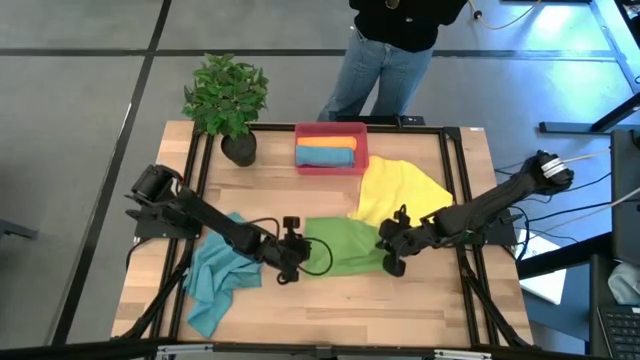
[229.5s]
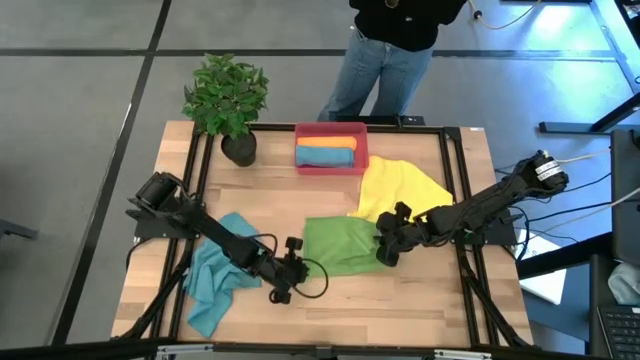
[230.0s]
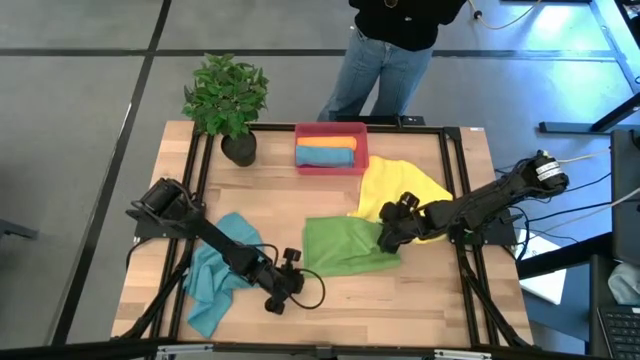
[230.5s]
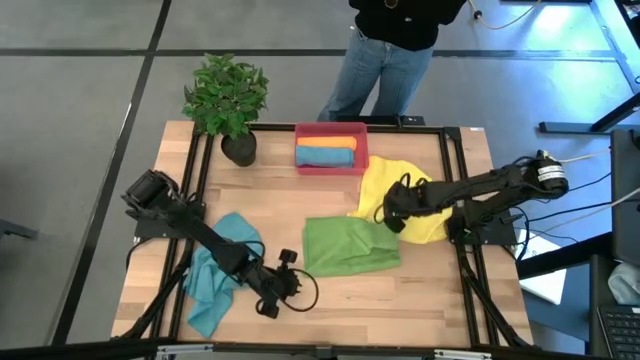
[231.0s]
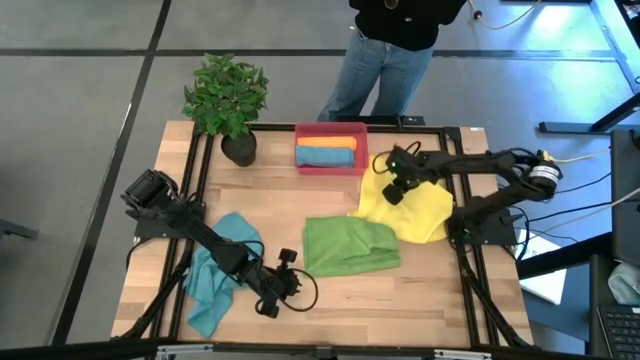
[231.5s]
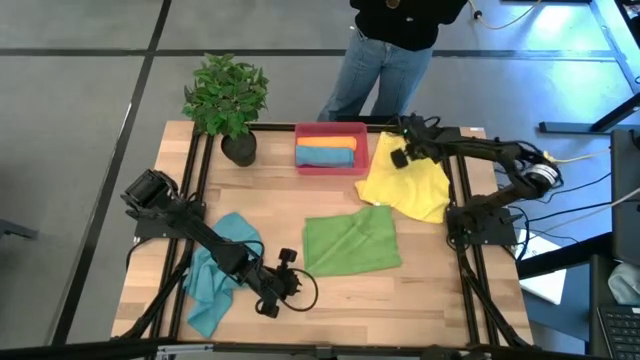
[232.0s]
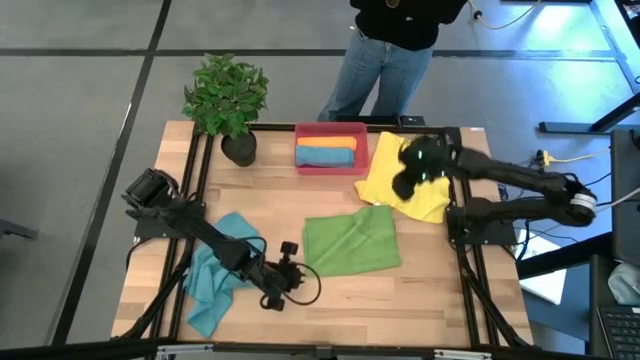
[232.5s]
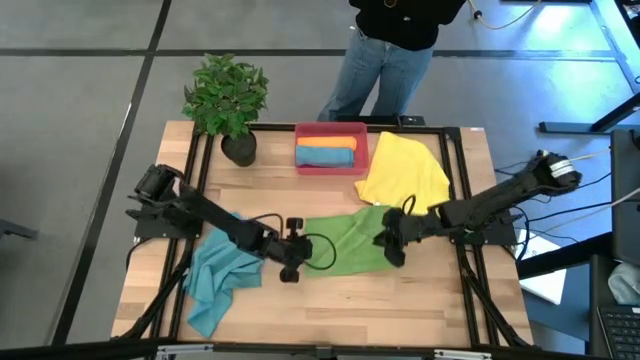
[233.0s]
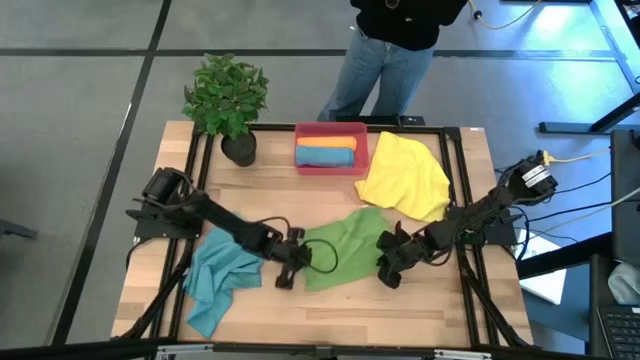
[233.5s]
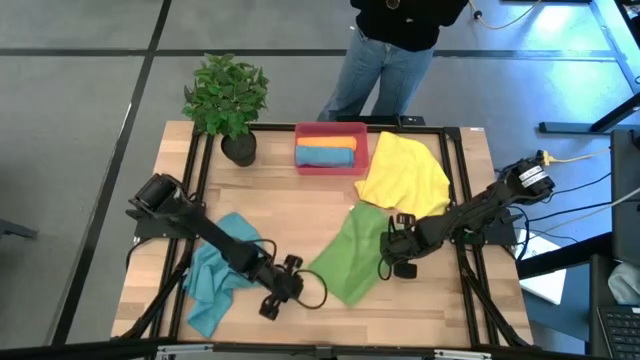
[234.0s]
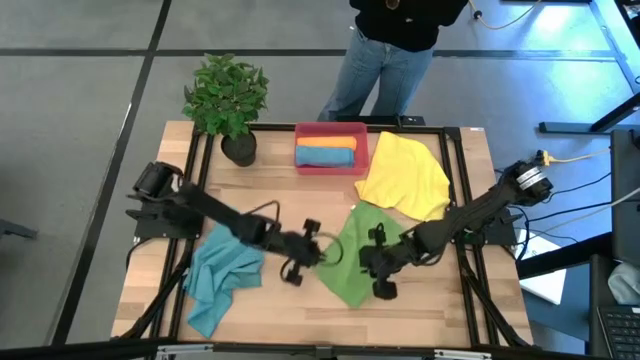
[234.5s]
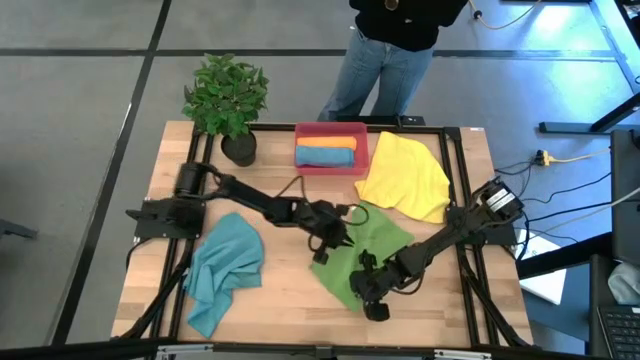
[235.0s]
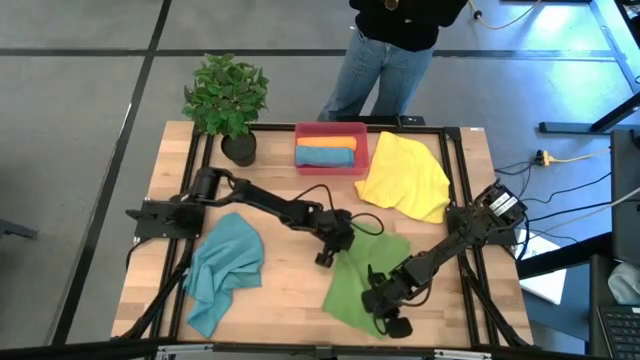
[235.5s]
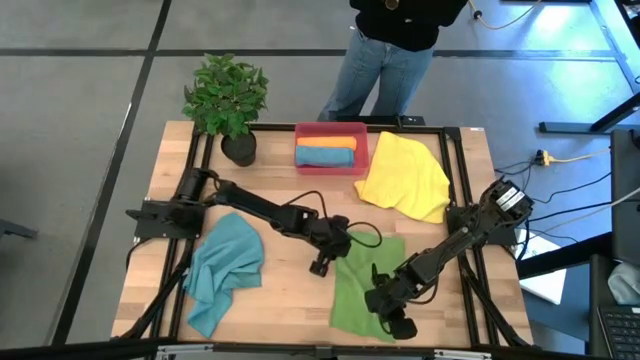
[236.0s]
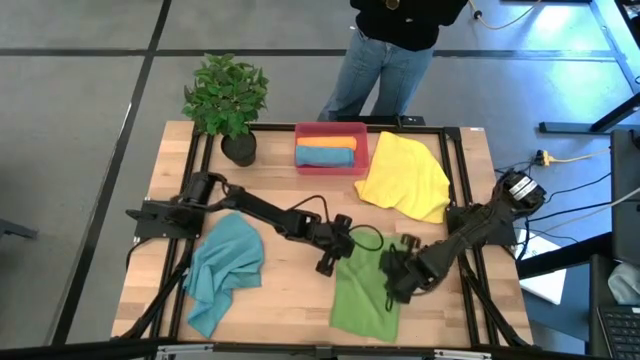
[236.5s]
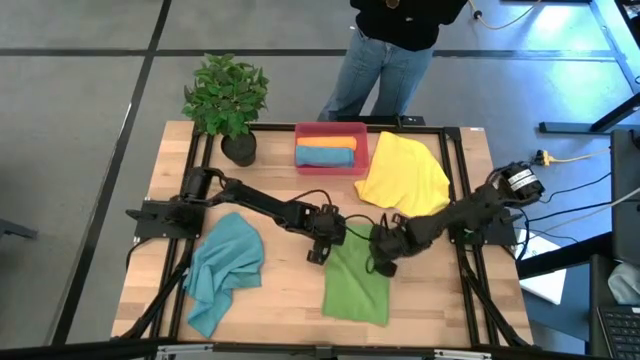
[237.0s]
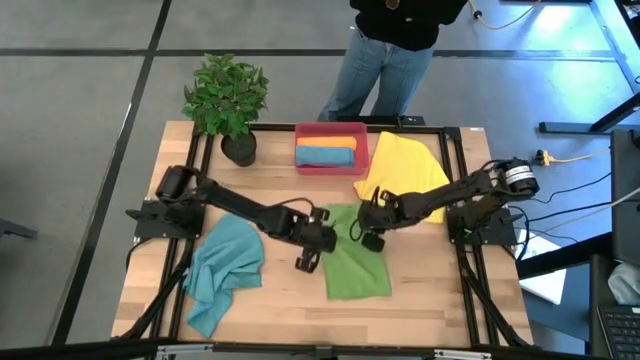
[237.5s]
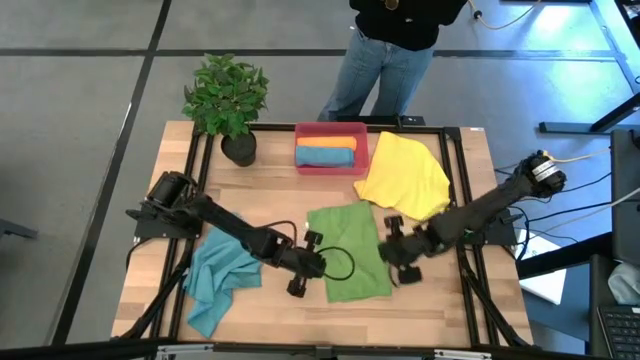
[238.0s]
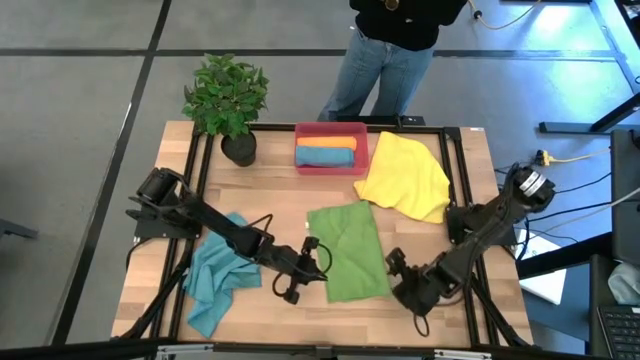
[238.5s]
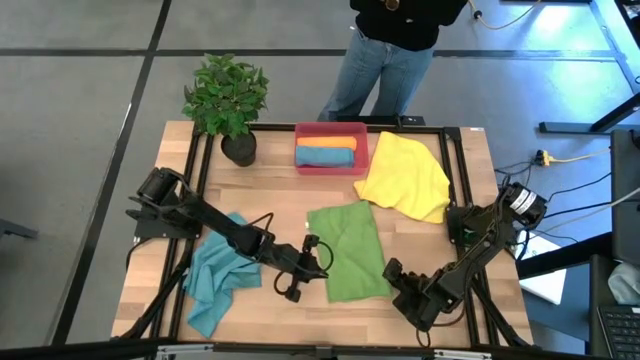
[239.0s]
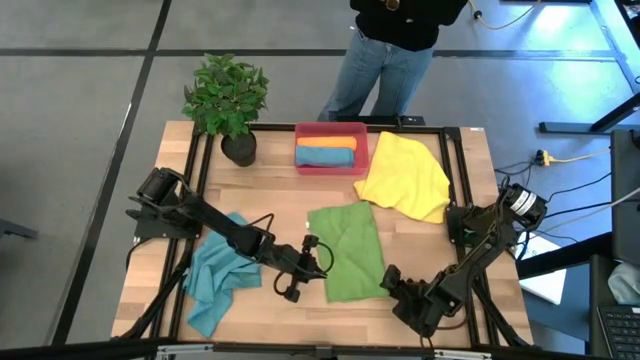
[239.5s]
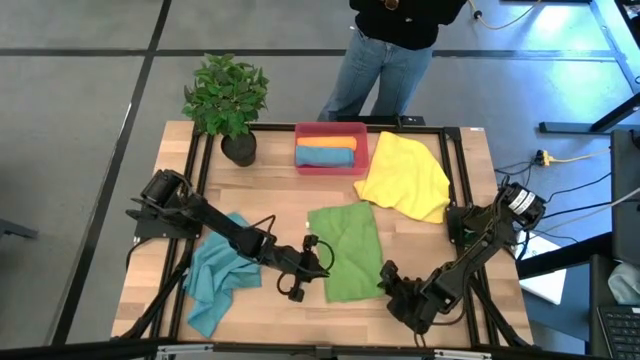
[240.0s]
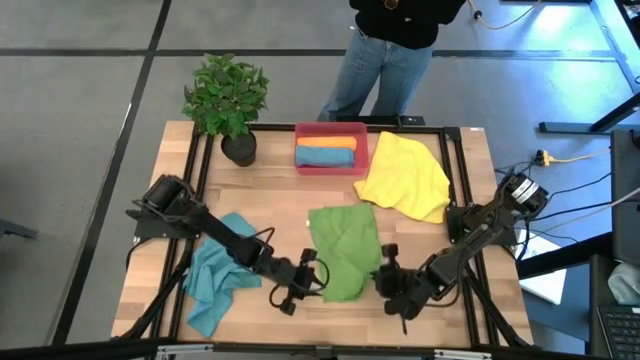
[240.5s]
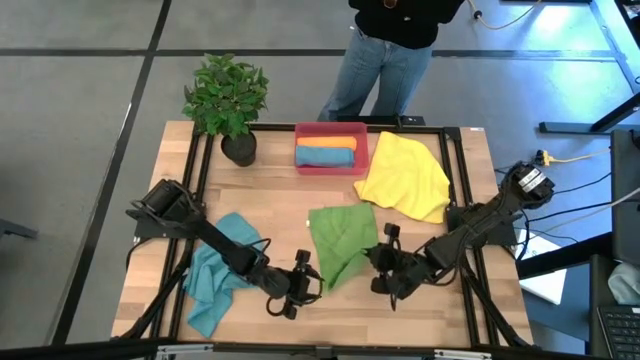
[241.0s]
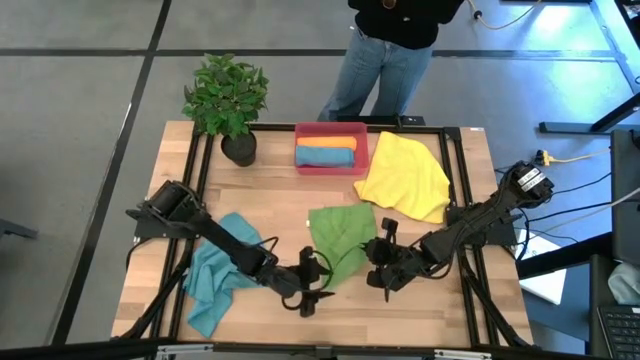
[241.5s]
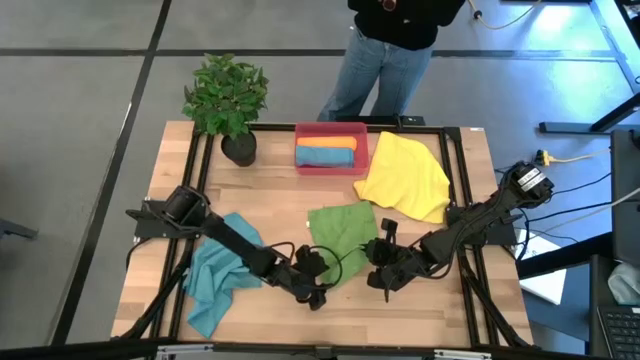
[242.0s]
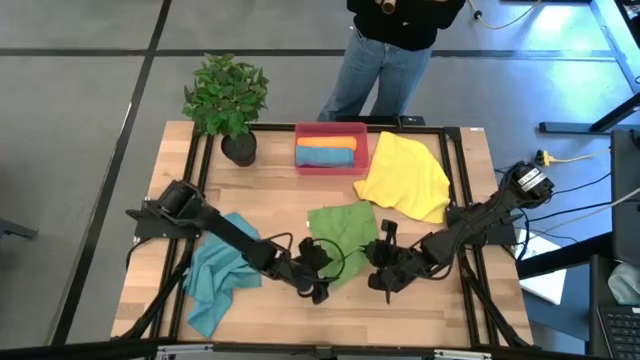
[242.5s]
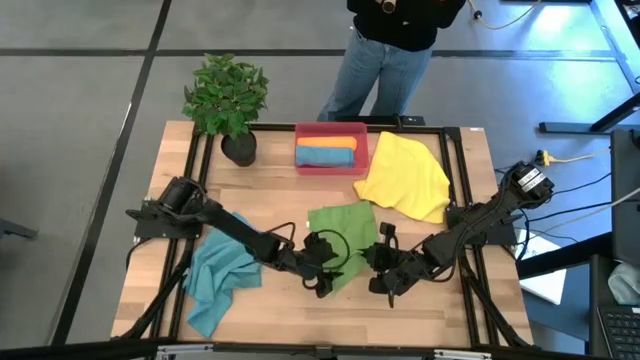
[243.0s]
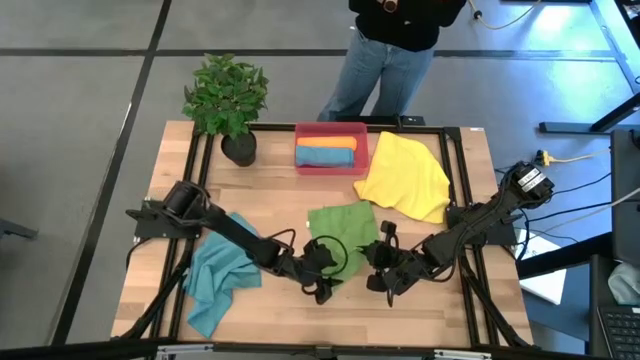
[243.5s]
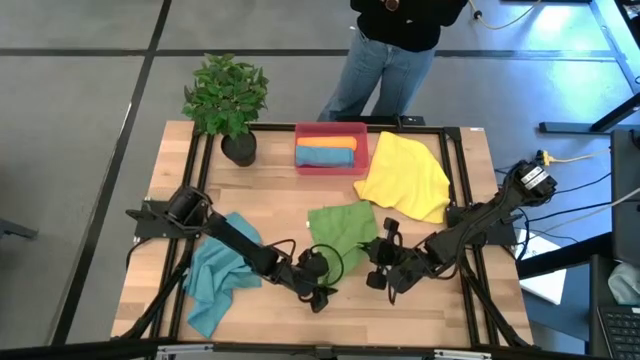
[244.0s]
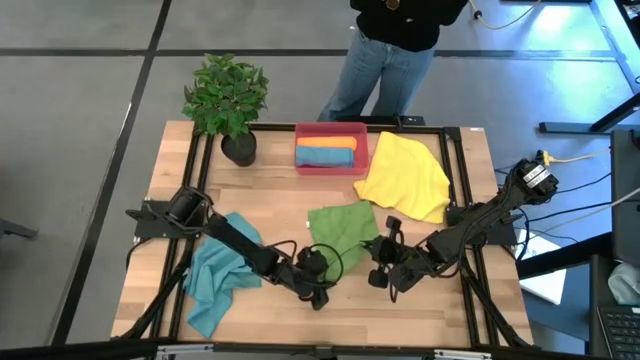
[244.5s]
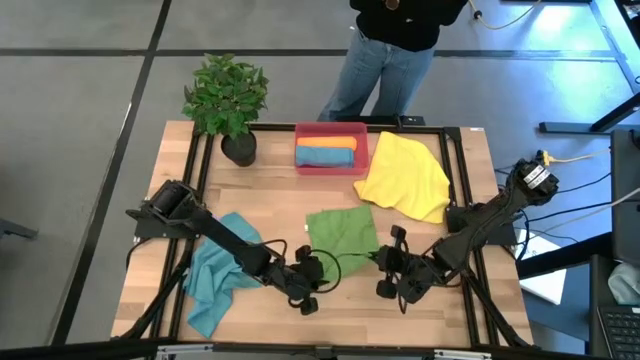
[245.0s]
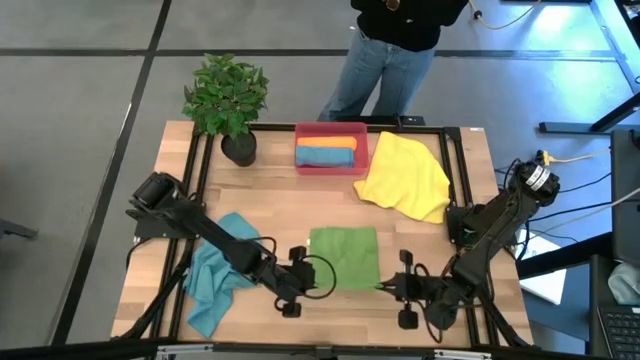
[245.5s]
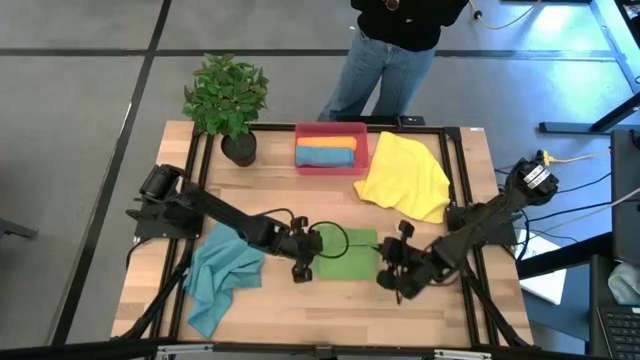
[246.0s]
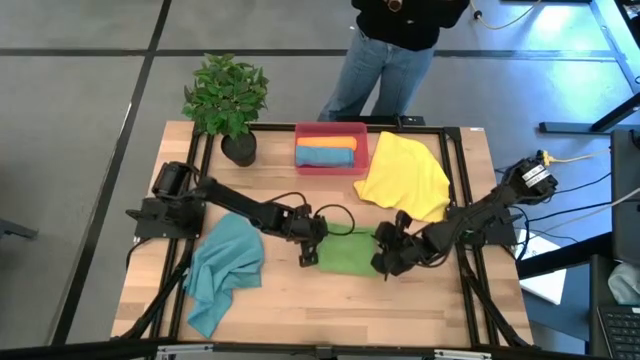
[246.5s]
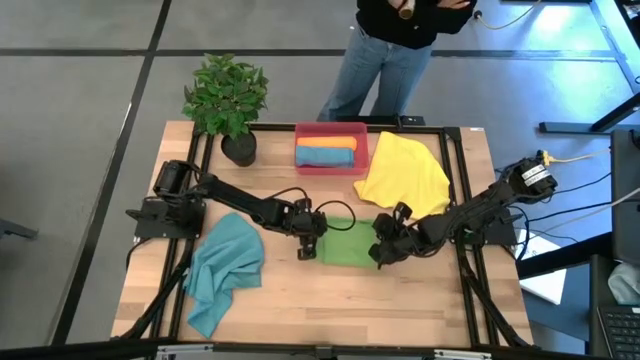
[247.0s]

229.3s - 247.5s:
Task: Roll microfiber towels into tight, uniform cylinder then place into a basket
Fold the green towel

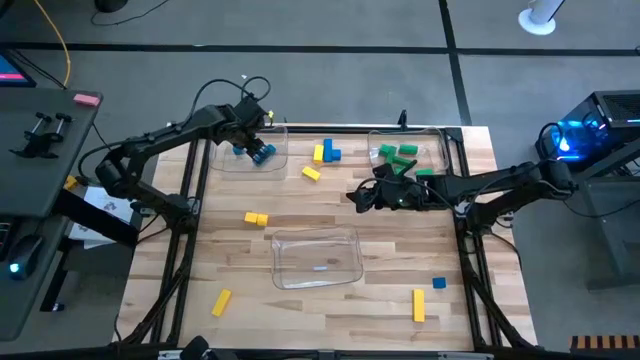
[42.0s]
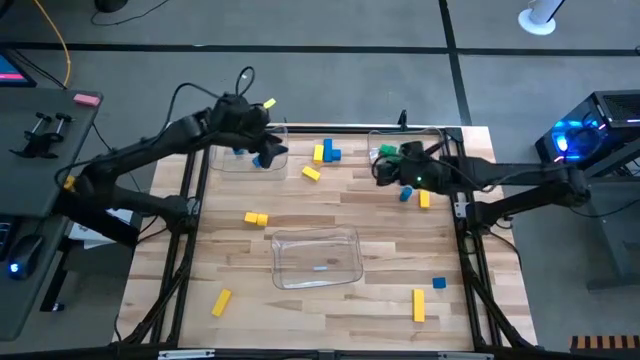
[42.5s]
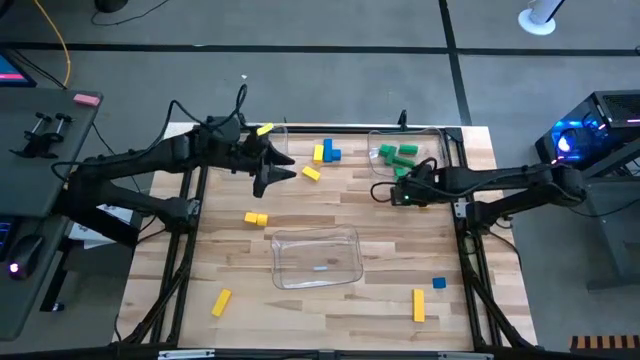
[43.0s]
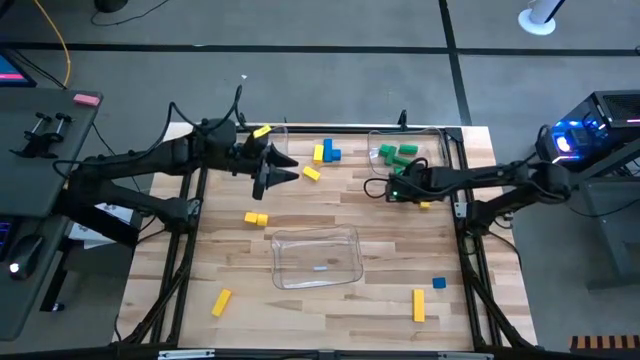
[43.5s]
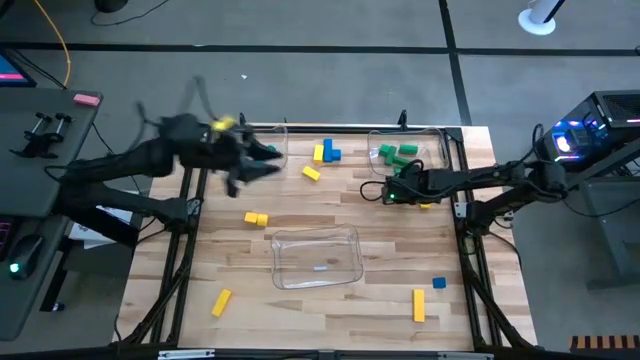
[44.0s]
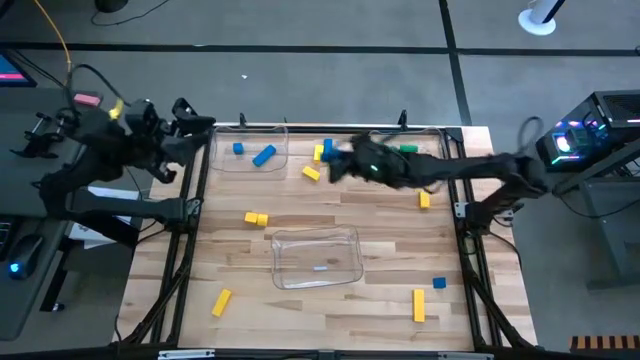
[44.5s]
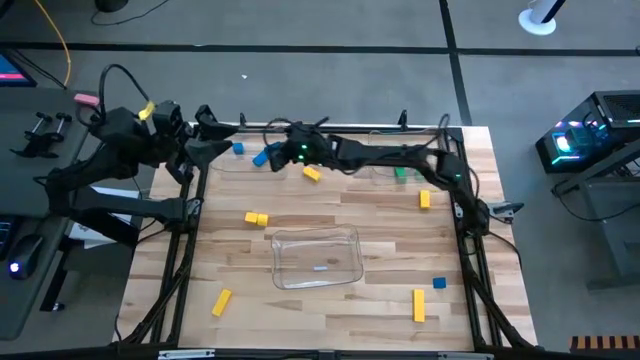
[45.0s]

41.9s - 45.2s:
Task: Sort blocks
Put the blue block into the top left transparent bin

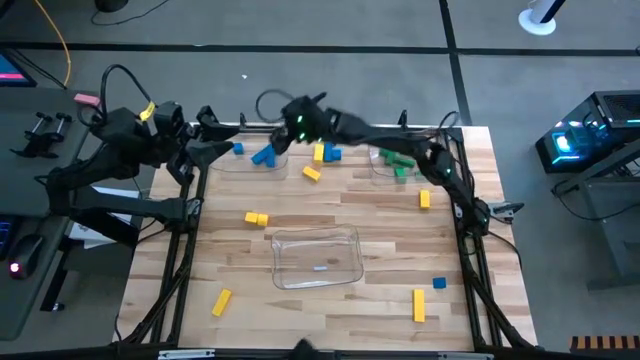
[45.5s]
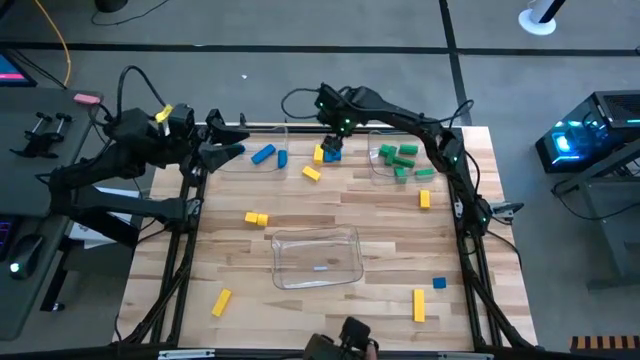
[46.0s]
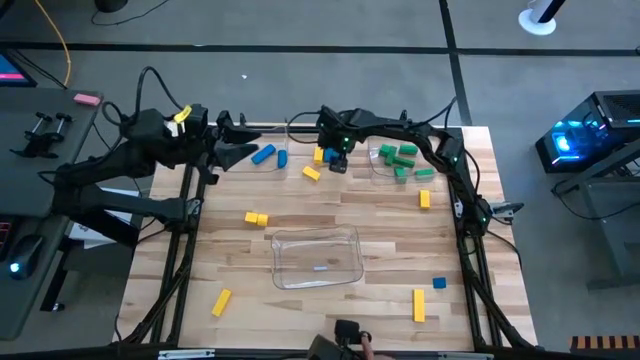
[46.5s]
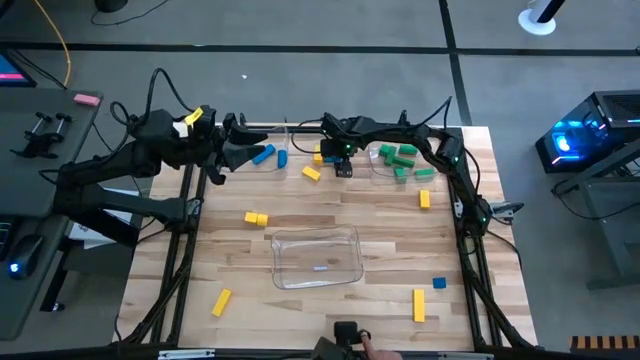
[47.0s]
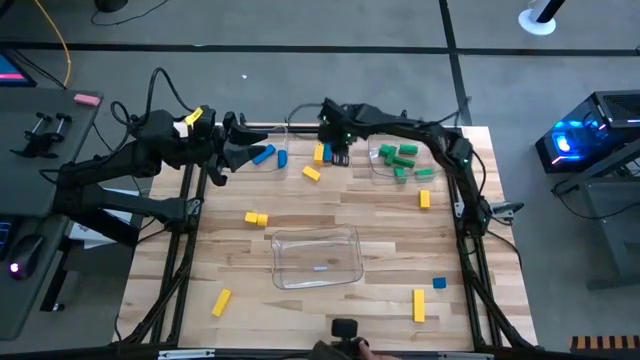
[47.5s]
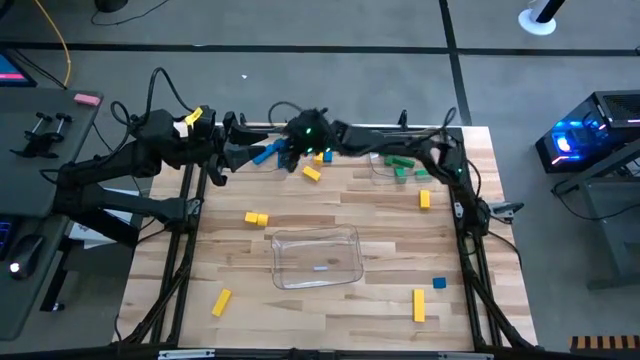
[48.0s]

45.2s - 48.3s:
Put the blue block into the top left transparent bin
